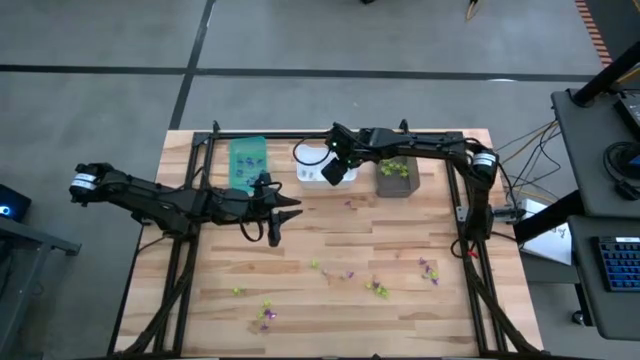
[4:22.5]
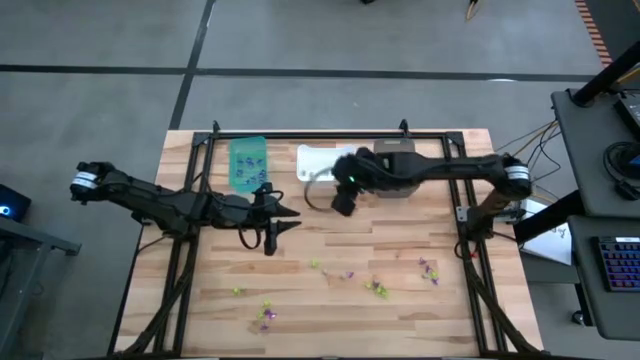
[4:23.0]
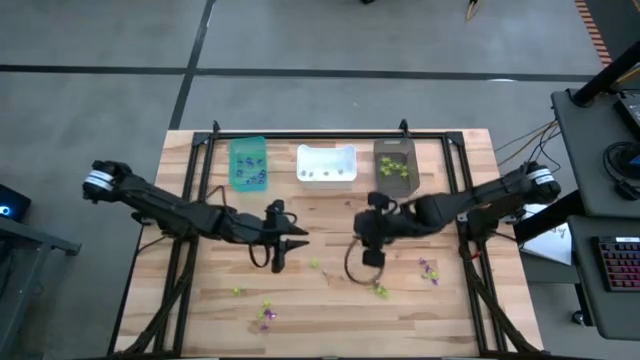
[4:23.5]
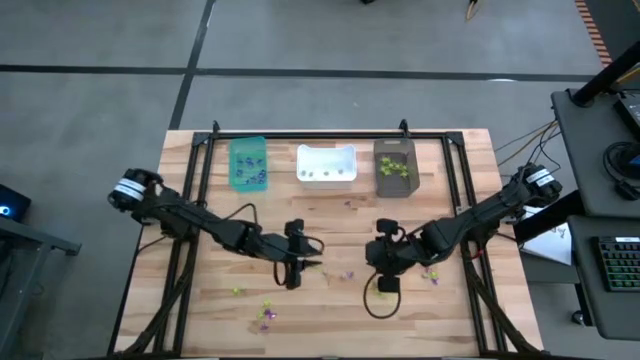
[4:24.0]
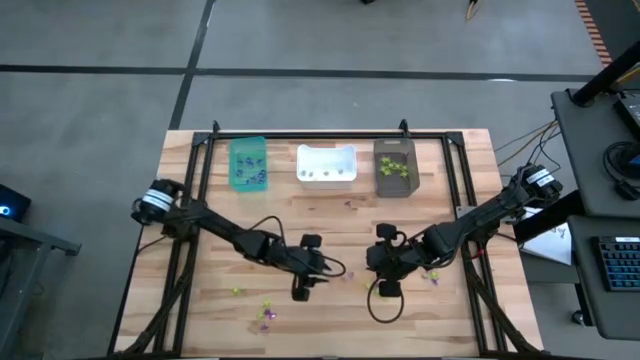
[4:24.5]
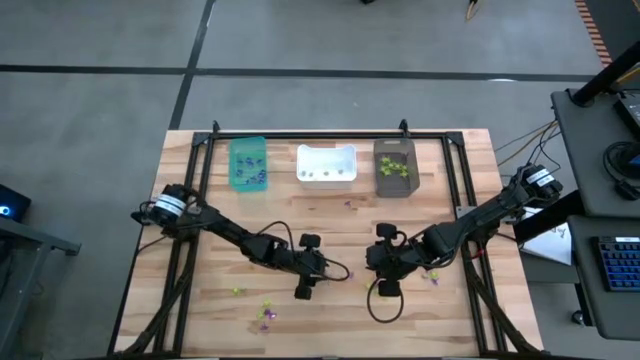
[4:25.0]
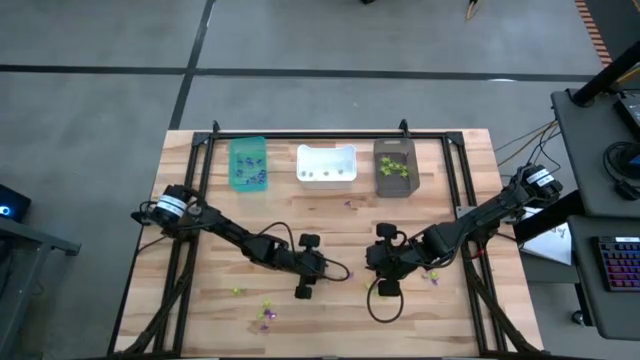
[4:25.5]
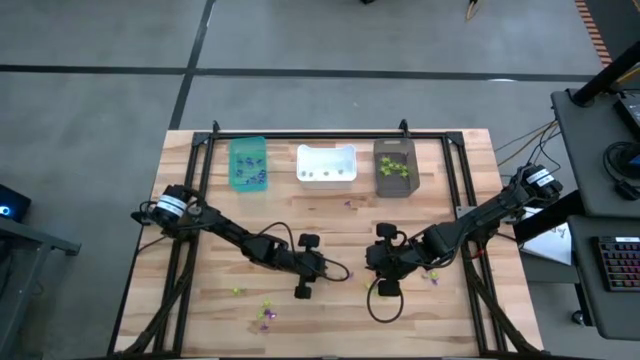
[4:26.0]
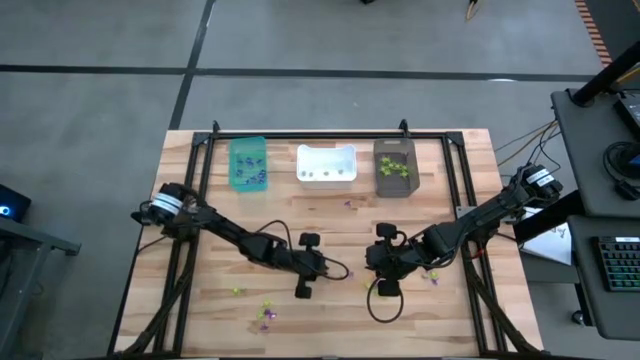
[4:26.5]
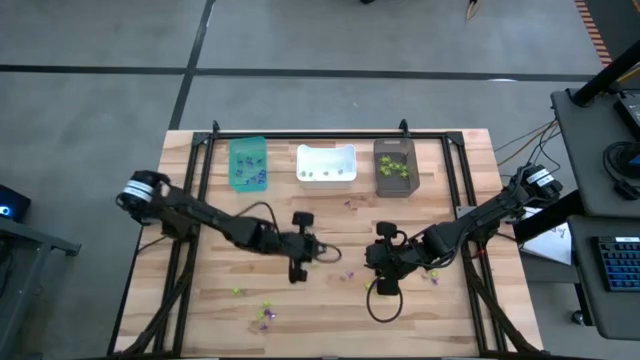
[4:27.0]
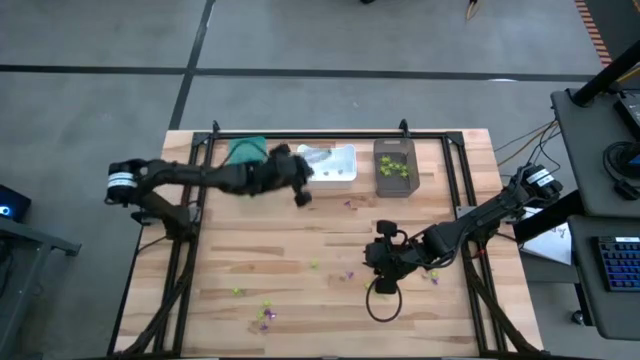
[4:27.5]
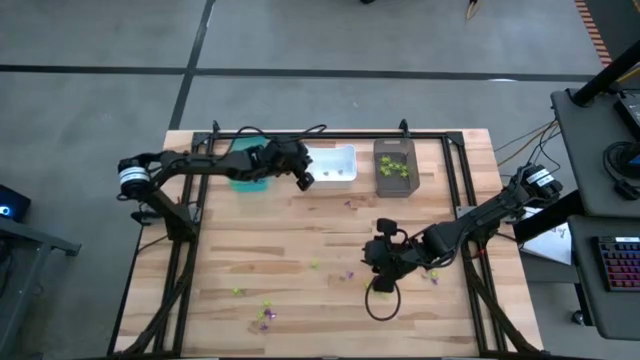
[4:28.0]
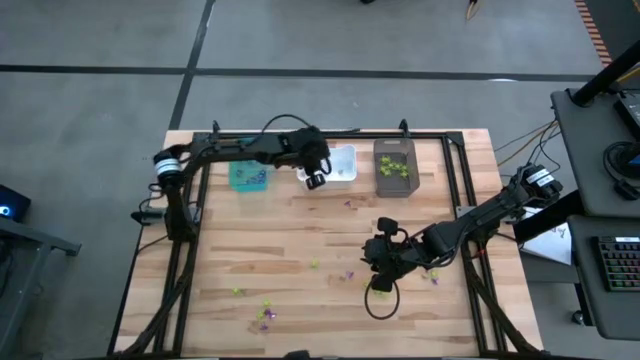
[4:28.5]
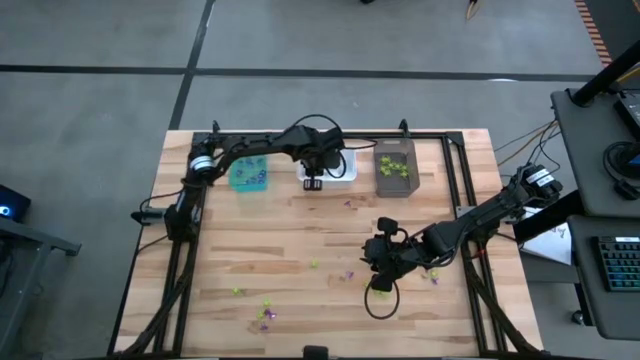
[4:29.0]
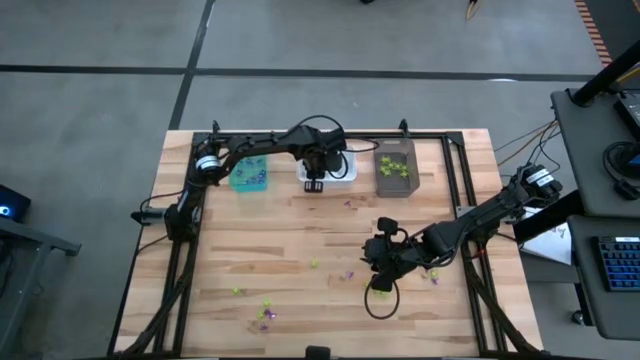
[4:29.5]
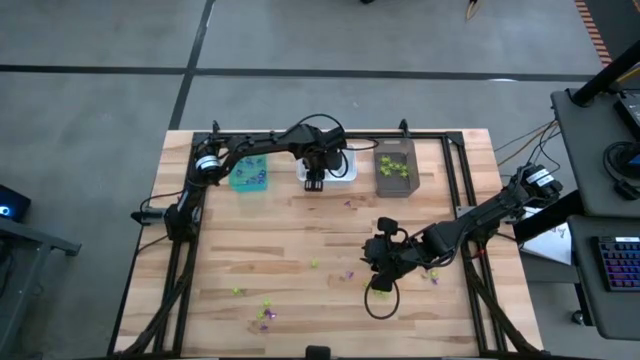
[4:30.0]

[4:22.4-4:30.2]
Task: Sort Halloween decoration
Put the white skull toy into the white bin

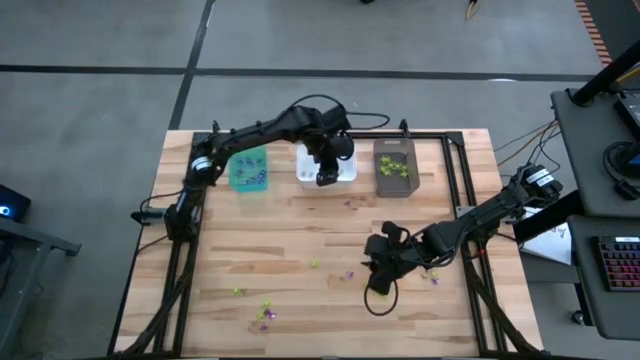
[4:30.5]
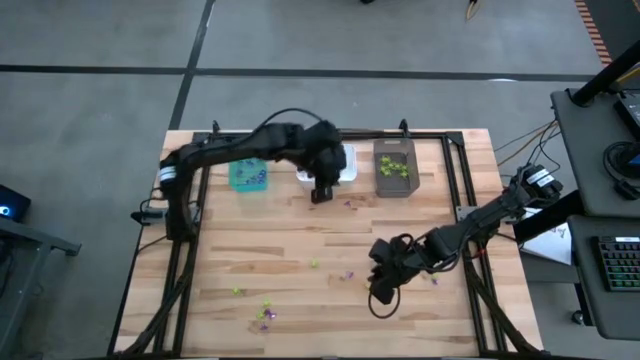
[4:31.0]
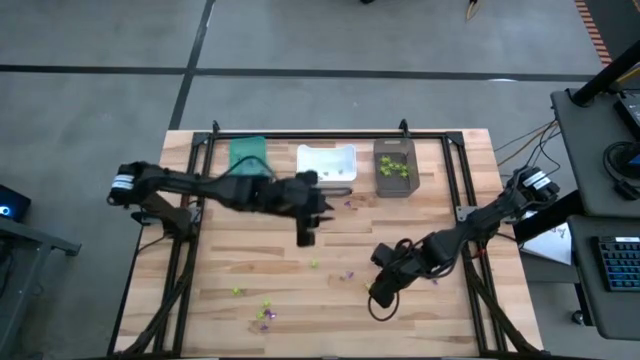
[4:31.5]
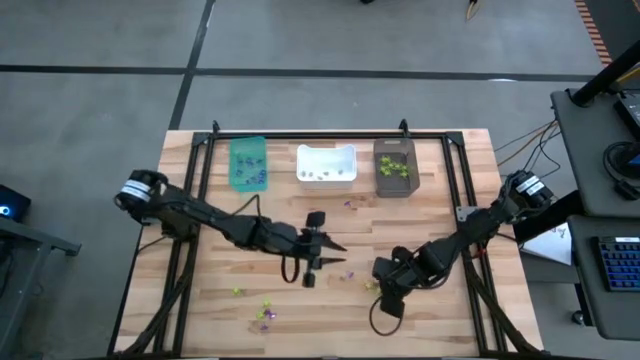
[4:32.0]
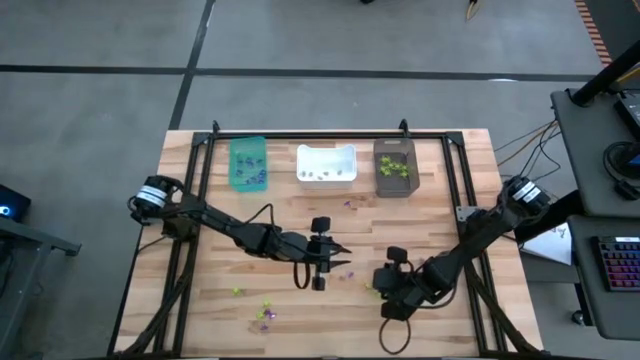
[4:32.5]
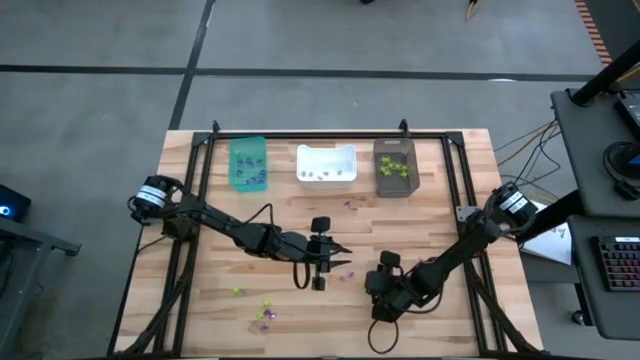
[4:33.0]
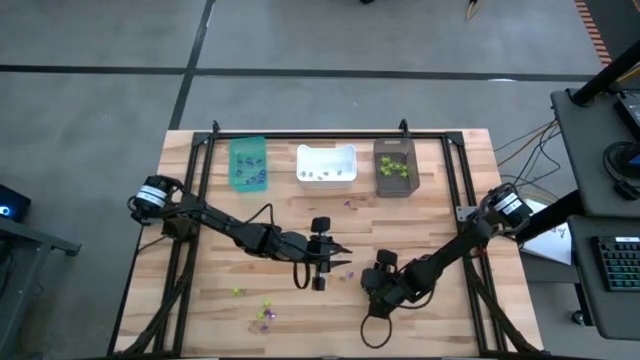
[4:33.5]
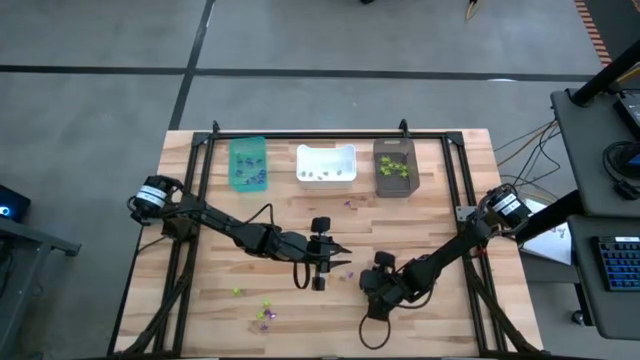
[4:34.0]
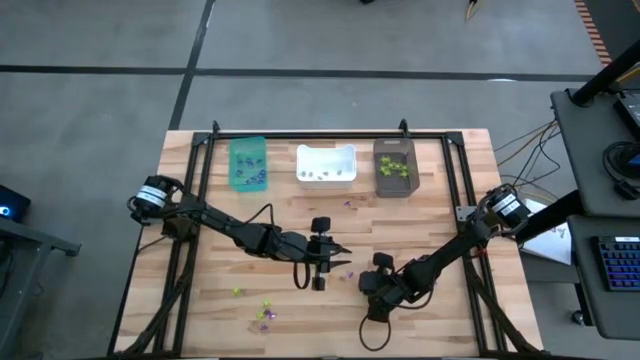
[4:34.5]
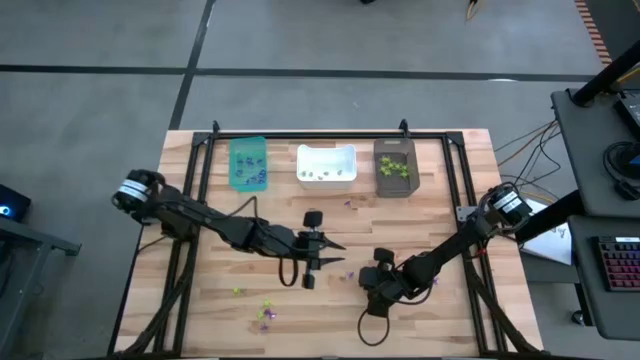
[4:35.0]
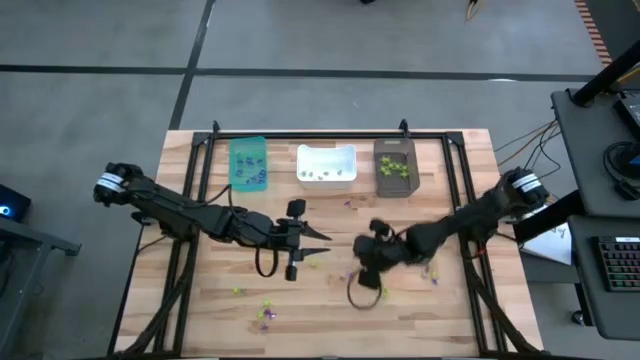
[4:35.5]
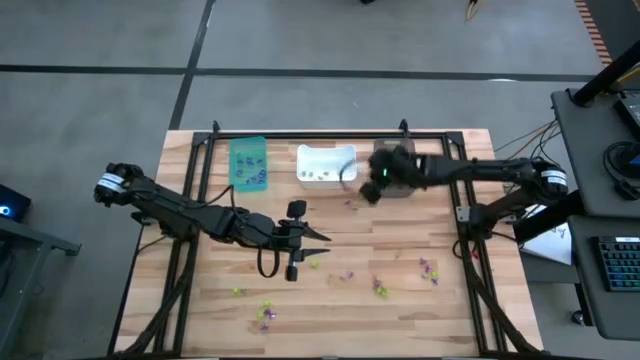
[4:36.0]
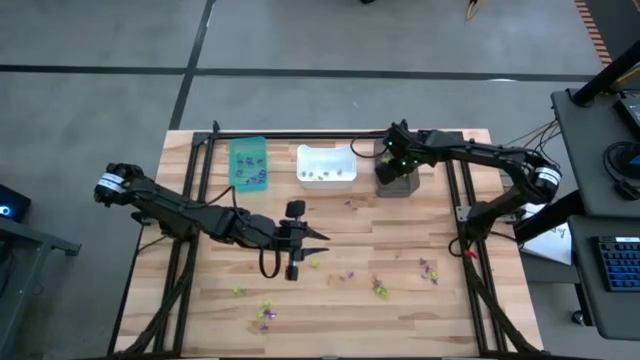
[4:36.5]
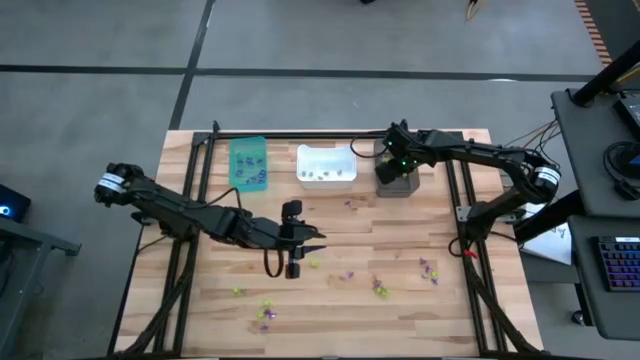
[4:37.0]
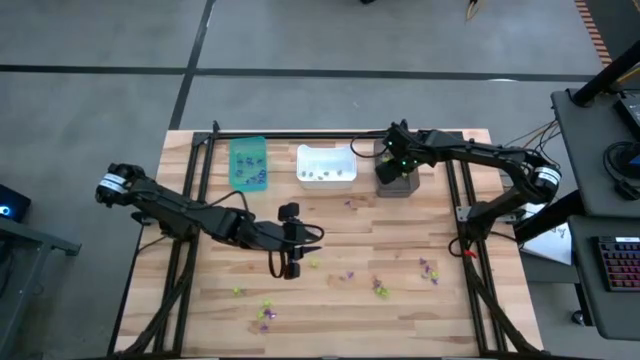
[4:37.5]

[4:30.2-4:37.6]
Put the green spider toy into the black bin

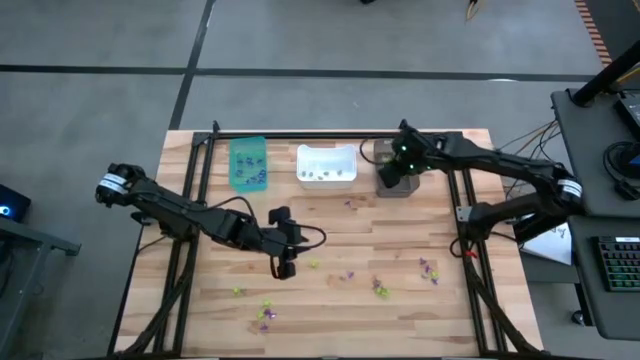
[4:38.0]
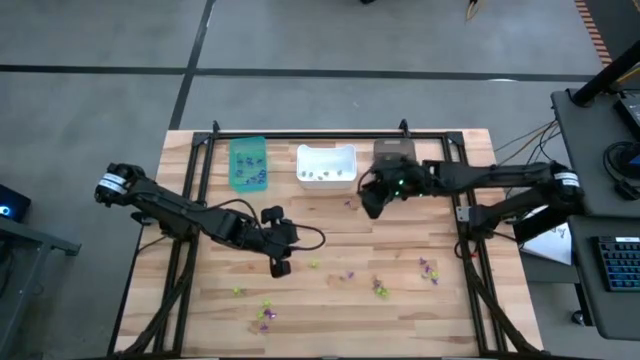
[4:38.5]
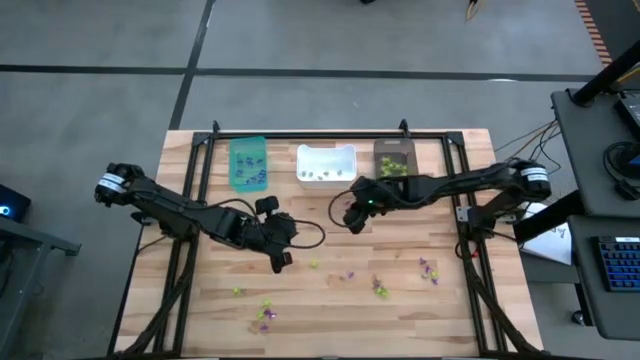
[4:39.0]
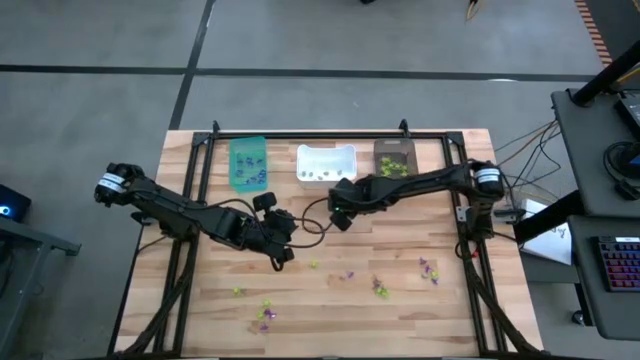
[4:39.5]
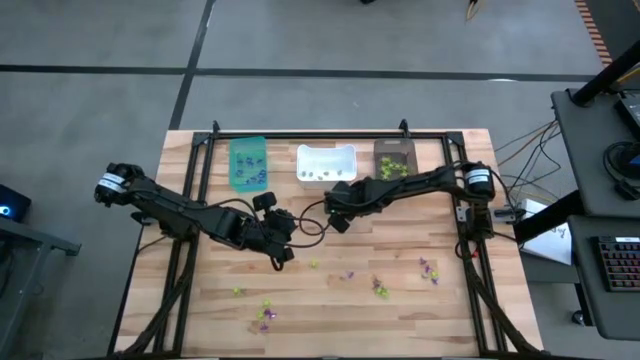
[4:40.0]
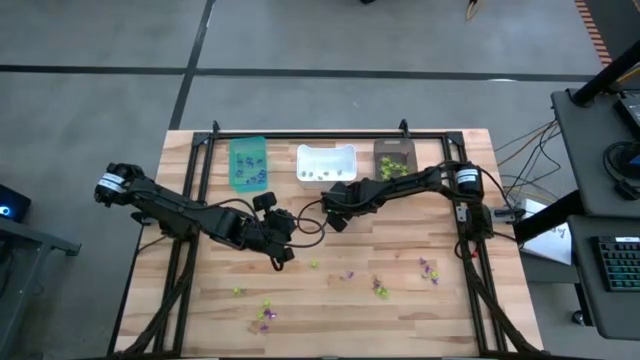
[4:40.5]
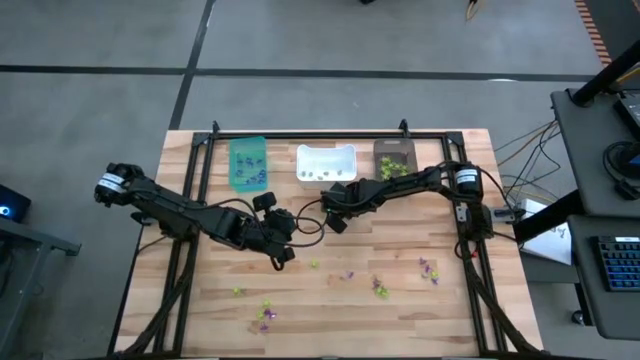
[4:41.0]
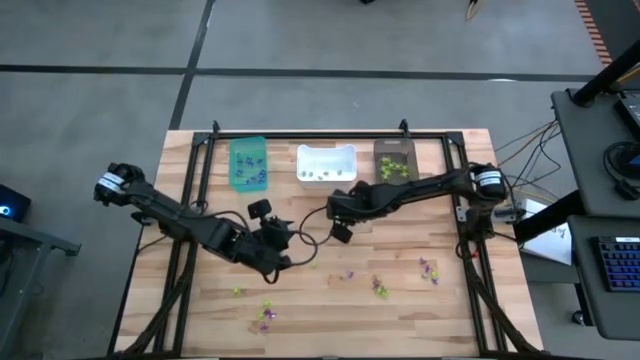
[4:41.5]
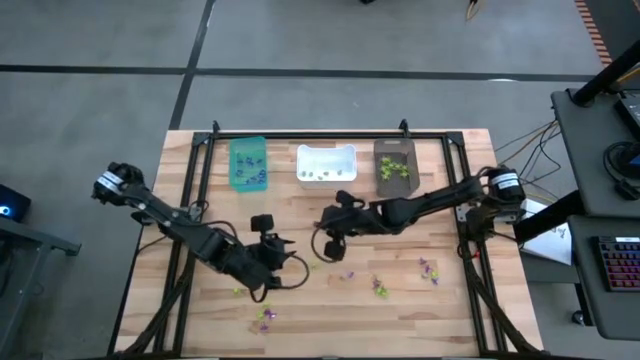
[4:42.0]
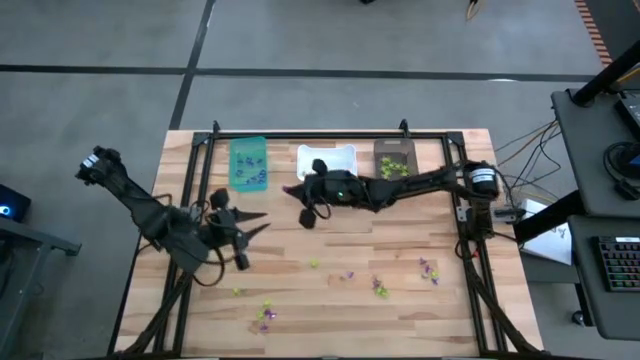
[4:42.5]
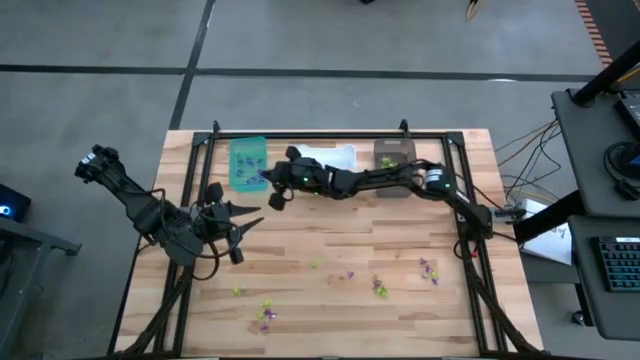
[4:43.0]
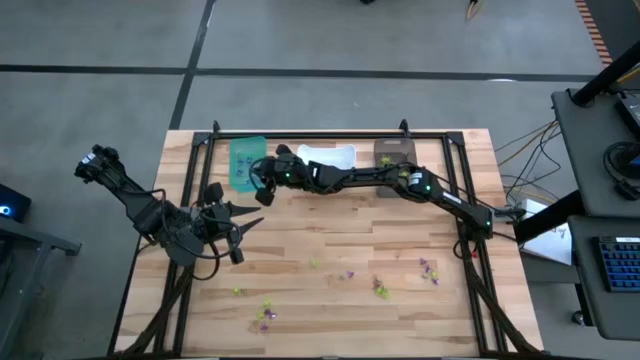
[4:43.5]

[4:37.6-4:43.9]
Put the purple witch hat toy into the light blue bin
